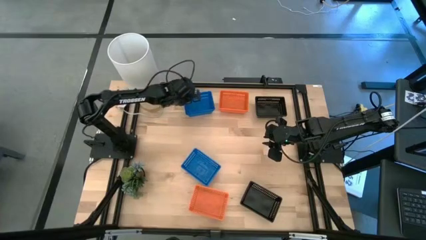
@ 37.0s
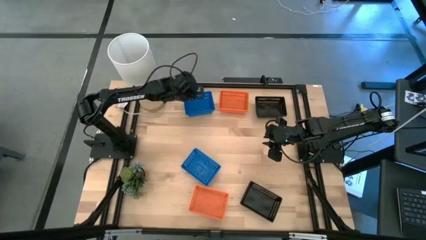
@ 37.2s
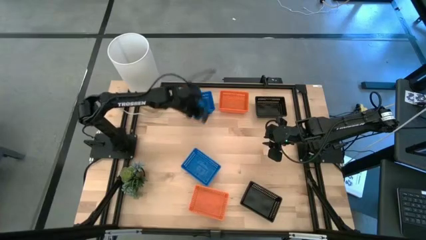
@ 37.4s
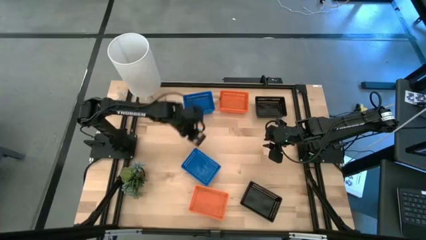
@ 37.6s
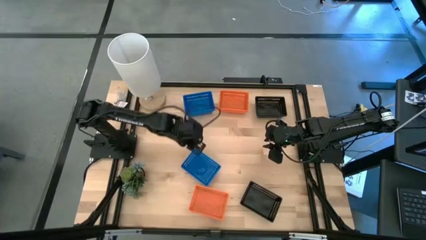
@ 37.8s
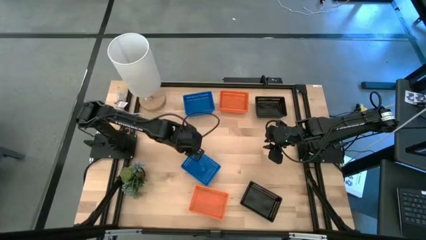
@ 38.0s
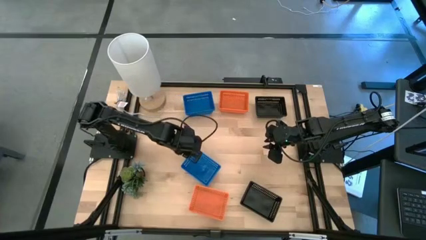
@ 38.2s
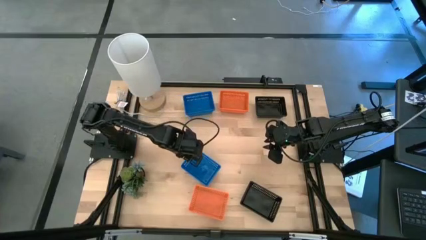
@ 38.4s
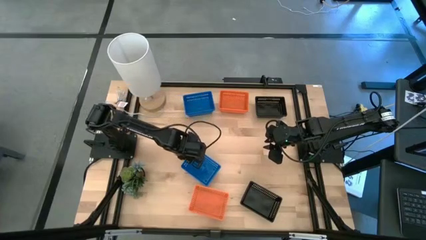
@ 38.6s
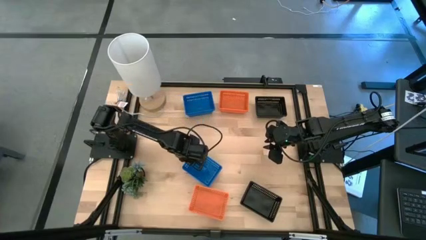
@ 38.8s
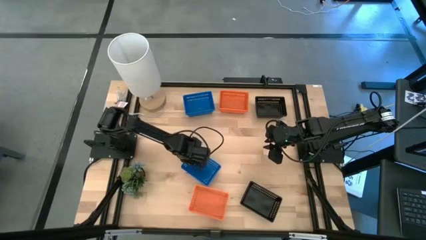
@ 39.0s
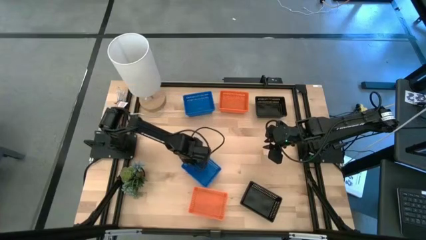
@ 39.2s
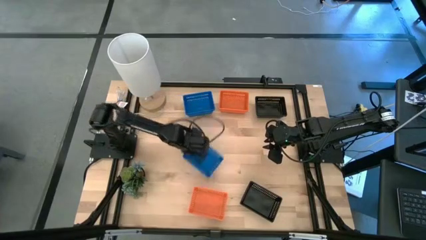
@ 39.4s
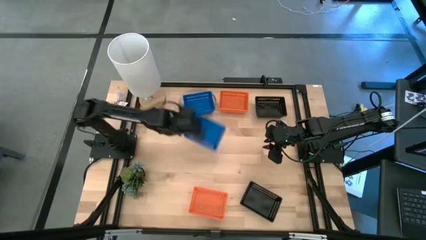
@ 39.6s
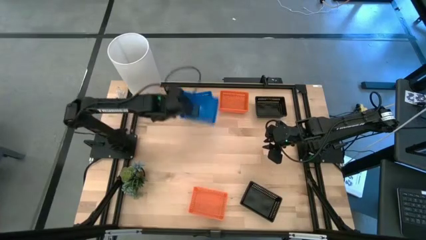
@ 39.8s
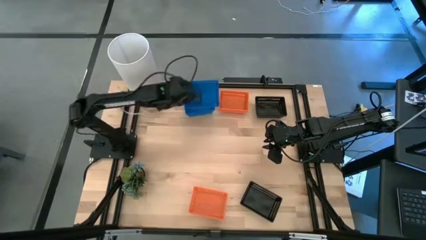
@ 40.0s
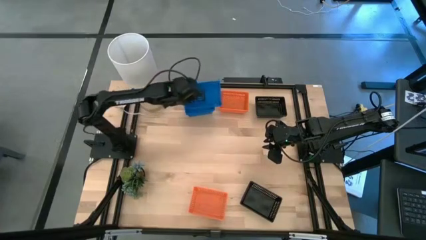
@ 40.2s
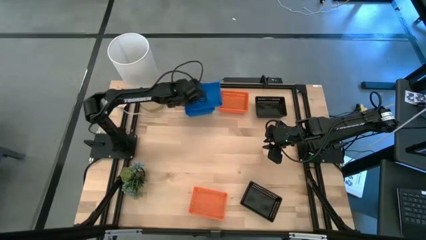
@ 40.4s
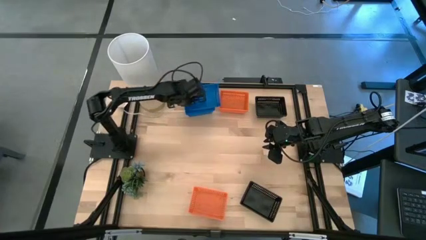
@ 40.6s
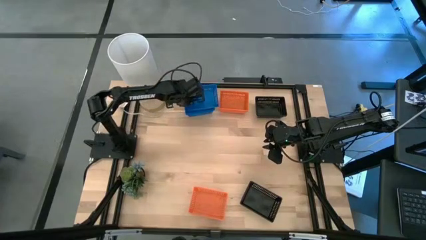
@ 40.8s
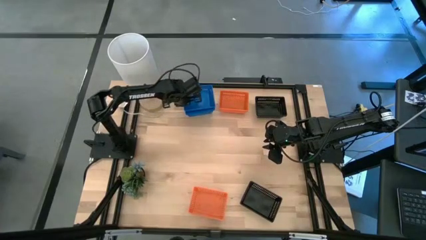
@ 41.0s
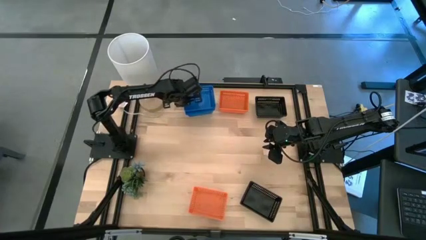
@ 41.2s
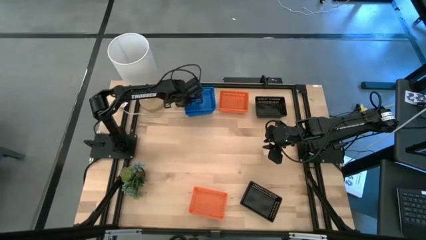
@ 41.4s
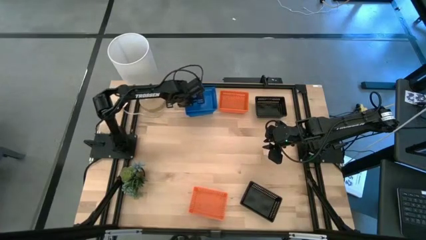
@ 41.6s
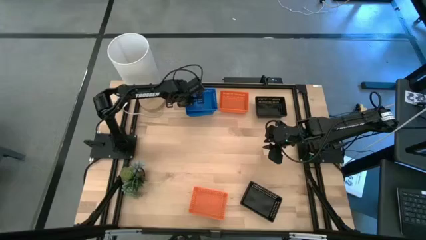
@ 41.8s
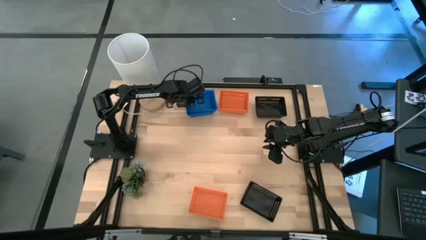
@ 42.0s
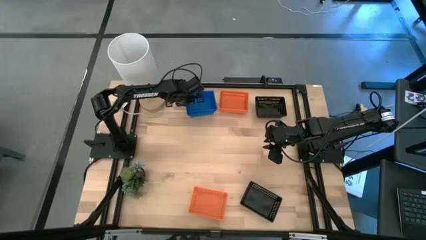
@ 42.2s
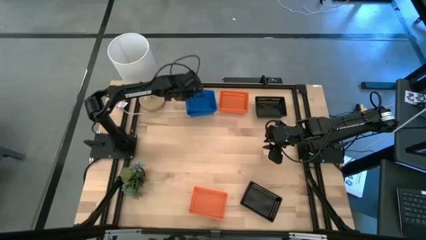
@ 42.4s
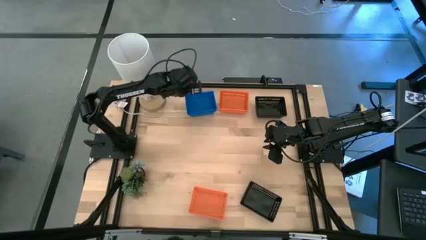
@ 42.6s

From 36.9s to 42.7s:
Stack the blue bin on top of the stacked blue bins

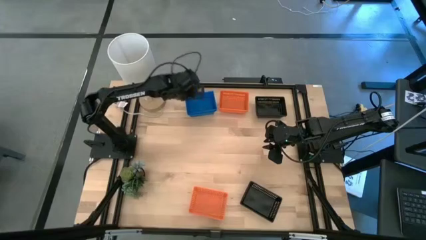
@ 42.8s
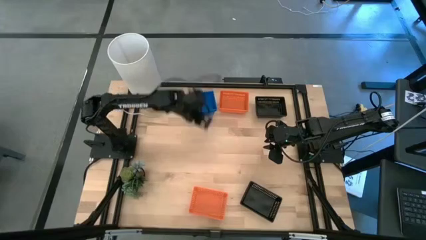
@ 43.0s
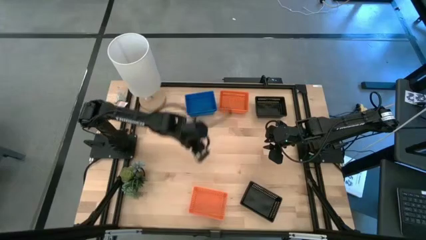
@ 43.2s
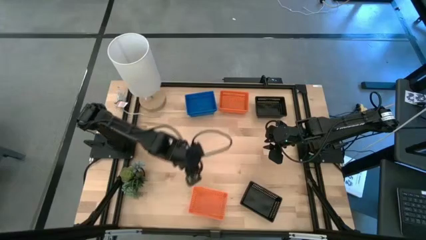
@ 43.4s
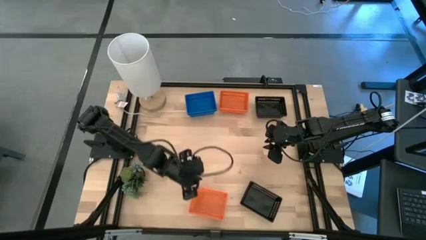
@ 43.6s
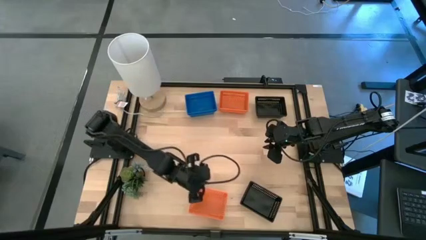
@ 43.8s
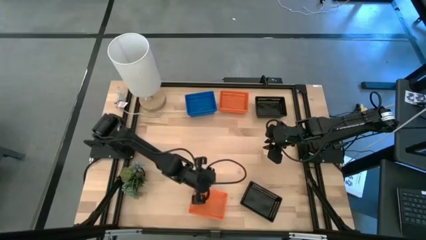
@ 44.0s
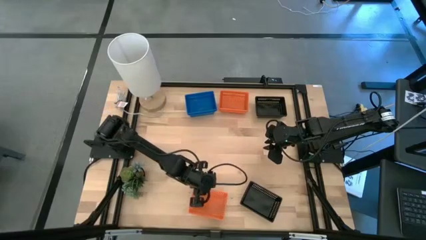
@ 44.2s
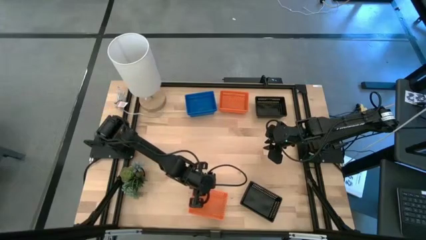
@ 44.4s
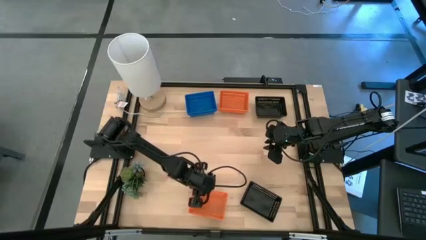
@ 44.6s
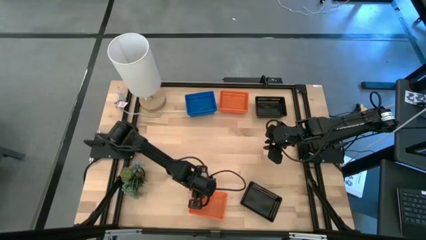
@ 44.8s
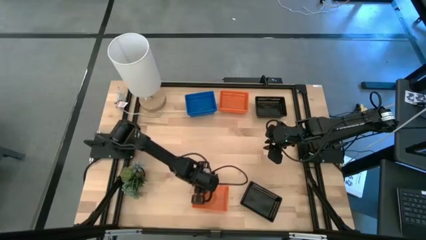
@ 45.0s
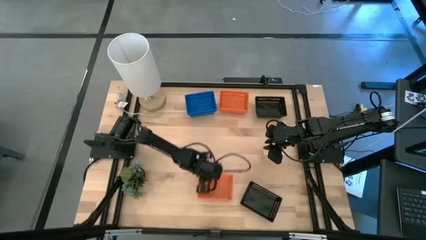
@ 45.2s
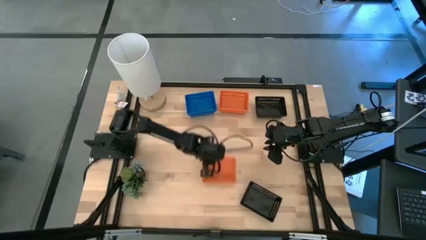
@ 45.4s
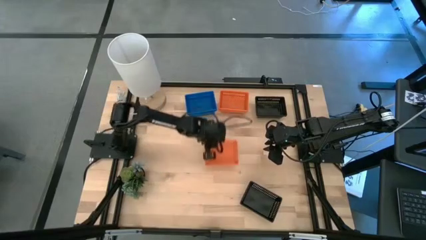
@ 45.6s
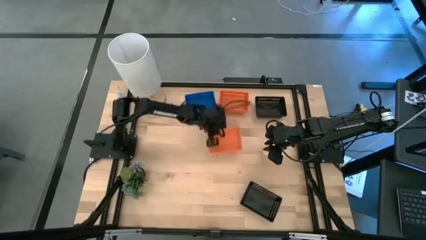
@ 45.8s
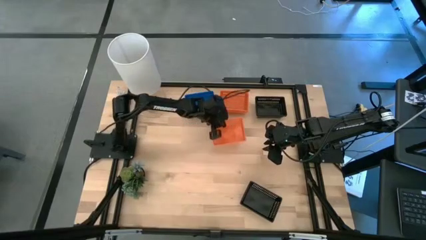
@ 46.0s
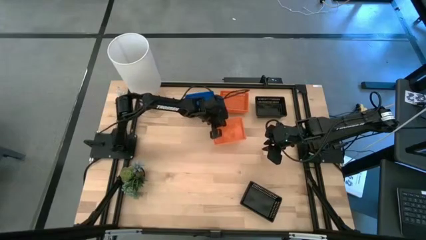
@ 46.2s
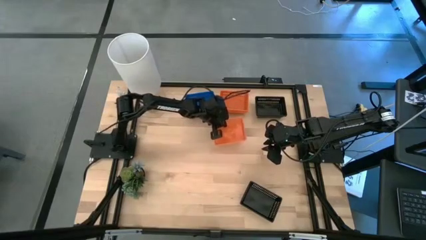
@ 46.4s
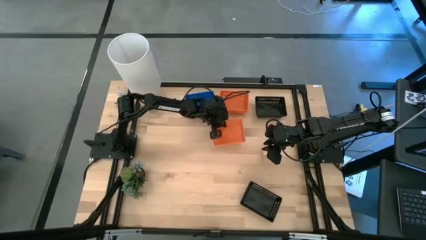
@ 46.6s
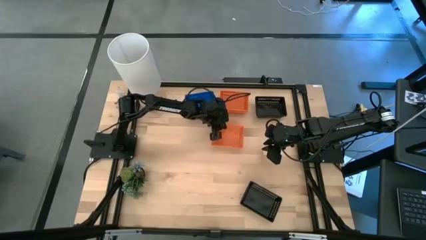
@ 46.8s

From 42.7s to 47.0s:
Move the orange bin to the center of the table

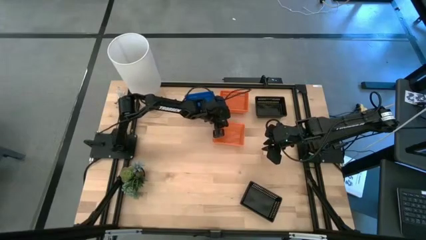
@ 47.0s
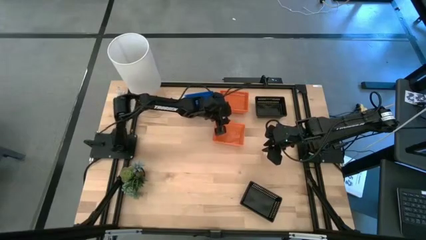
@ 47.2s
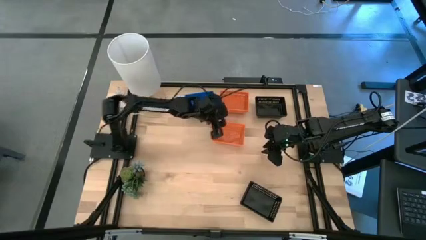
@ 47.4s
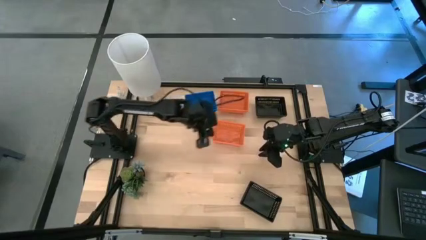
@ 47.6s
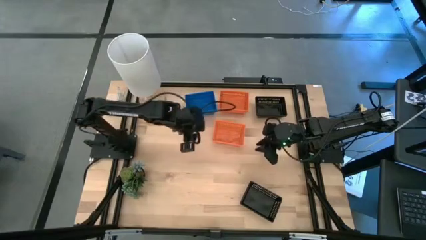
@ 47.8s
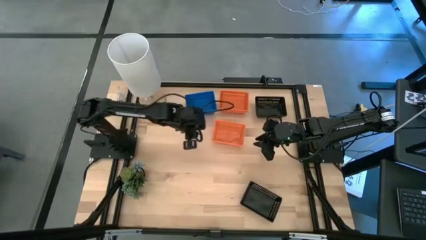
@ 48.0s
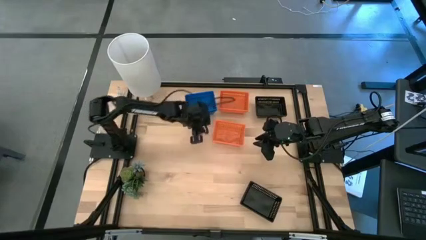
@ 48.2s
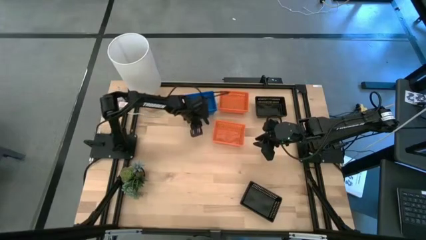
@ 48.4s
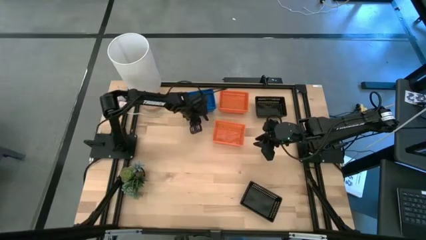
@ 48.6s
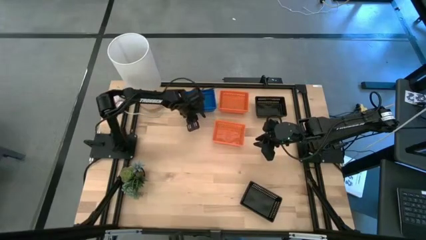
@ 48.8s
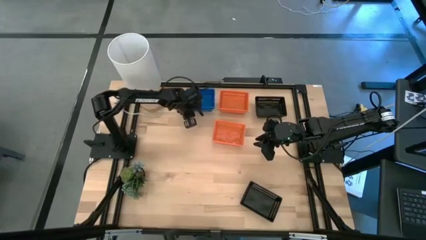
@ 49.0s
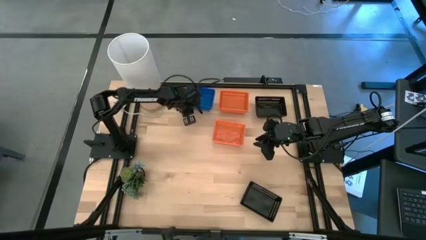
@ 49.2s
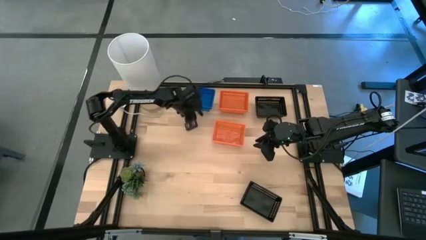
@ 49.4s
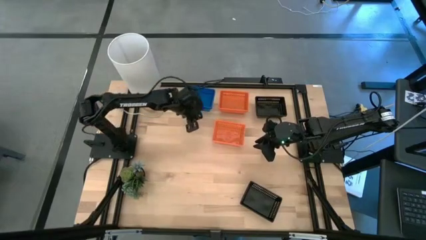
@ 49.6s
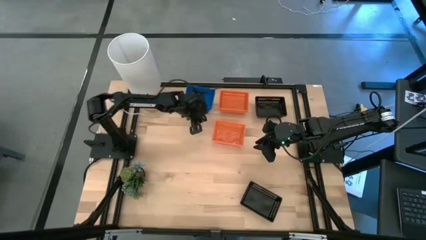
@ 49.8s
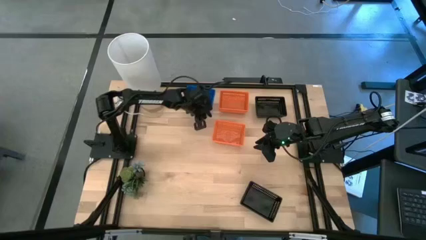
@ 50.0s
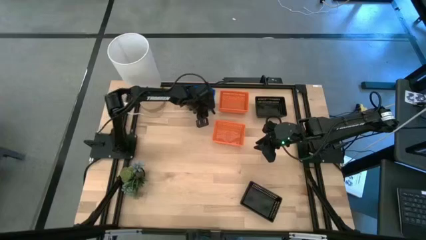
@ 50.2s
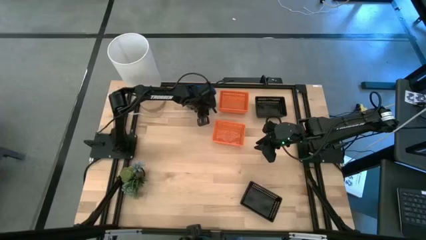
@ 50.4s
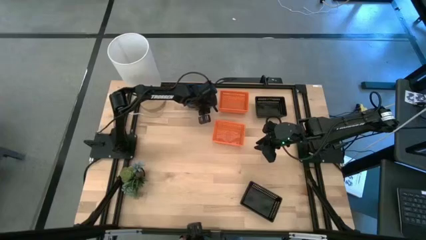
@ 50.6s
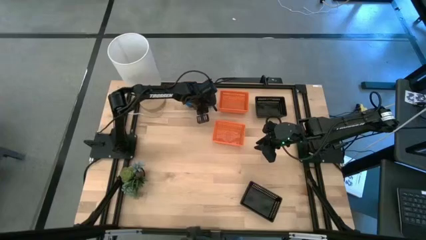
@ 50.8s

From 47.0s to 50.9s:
Adjust the stacked blue bins

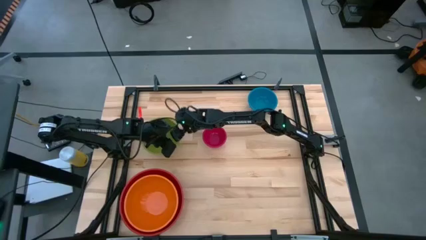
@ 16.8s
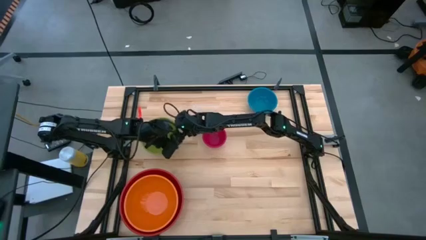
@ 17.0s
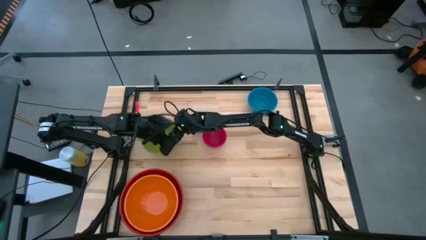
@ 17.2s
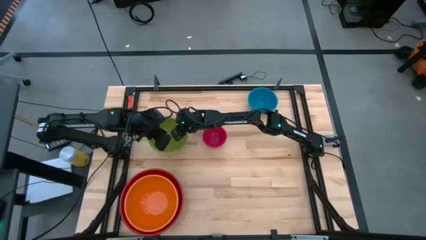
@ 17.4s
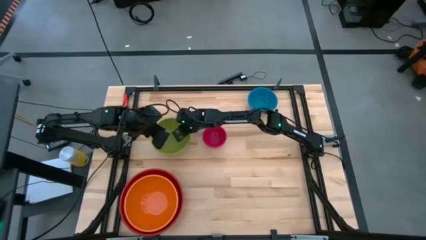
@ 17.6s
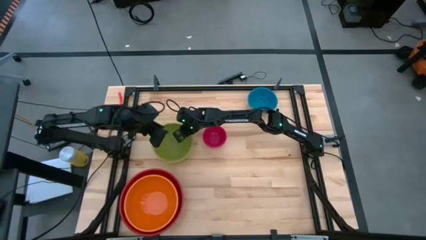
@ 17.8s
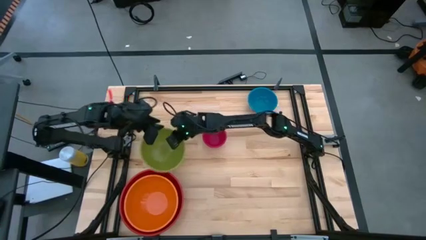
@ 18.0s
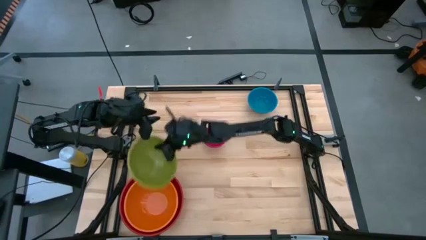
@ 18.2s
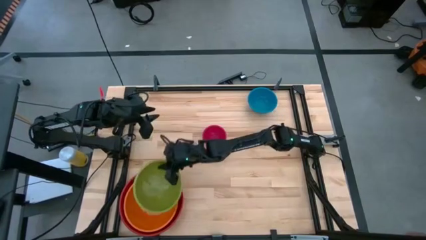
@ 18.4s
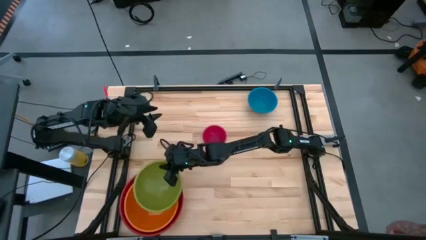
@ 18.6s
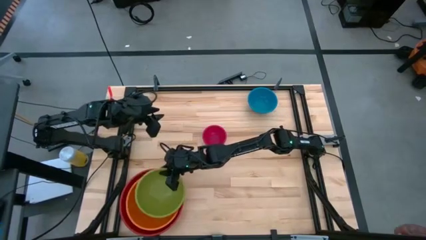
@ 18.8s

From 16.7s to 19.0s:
Stack the green bowl on top of the orange bowl
